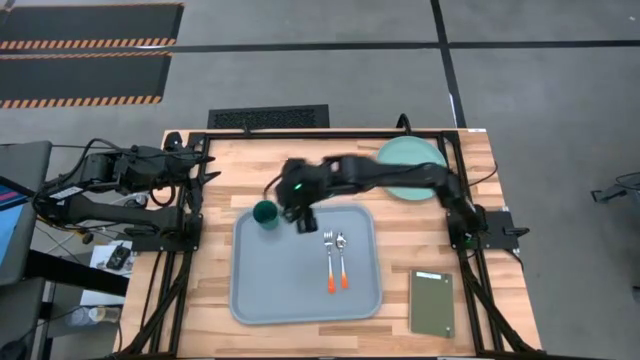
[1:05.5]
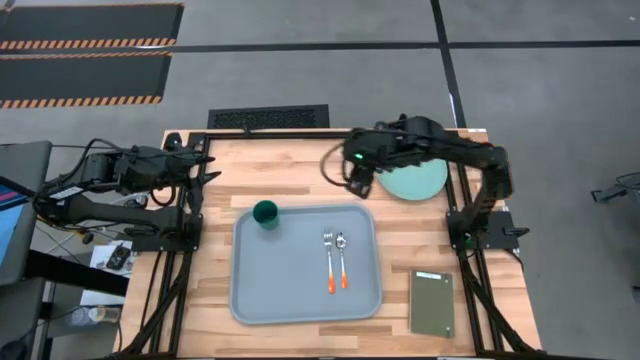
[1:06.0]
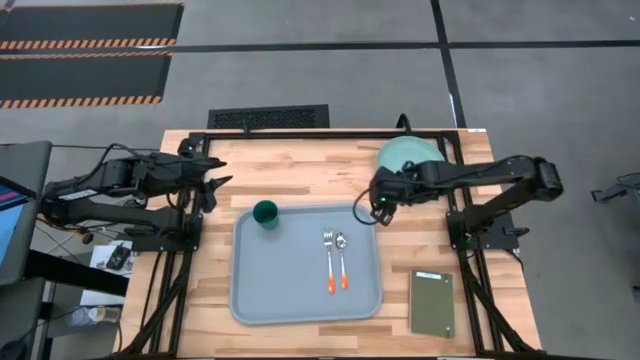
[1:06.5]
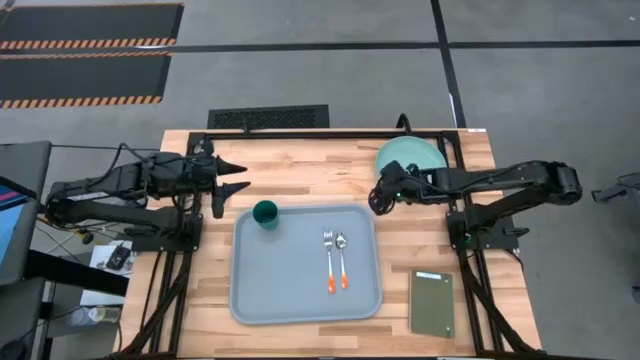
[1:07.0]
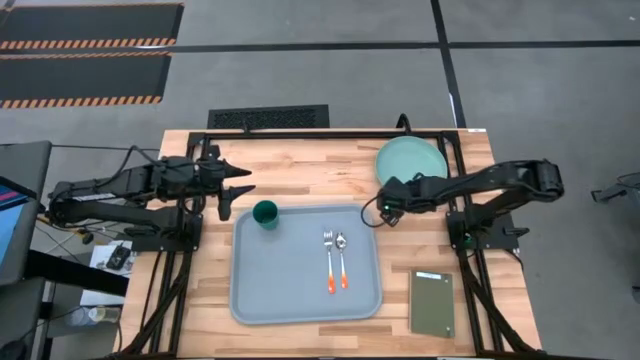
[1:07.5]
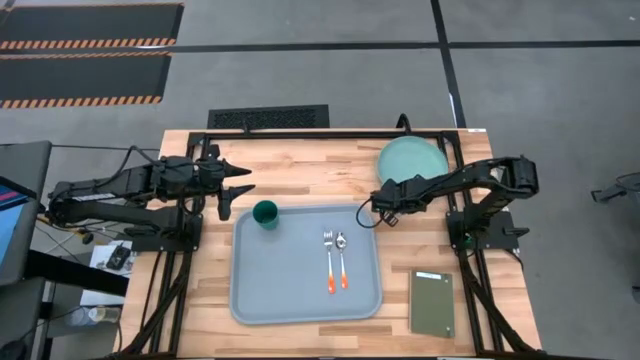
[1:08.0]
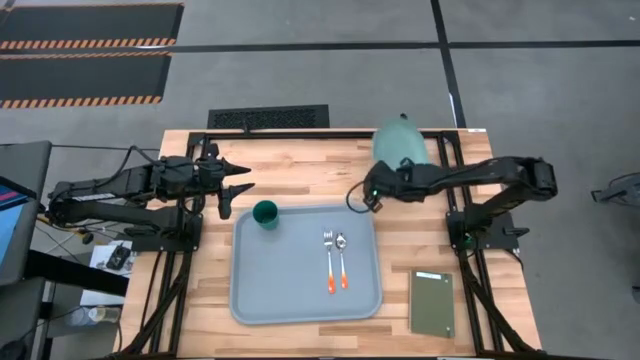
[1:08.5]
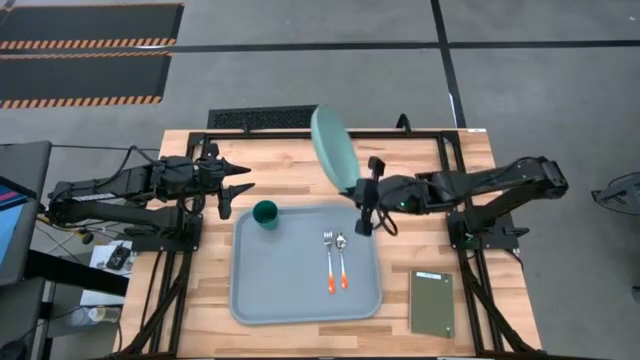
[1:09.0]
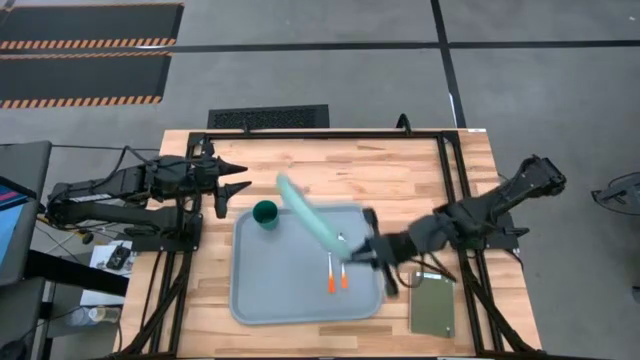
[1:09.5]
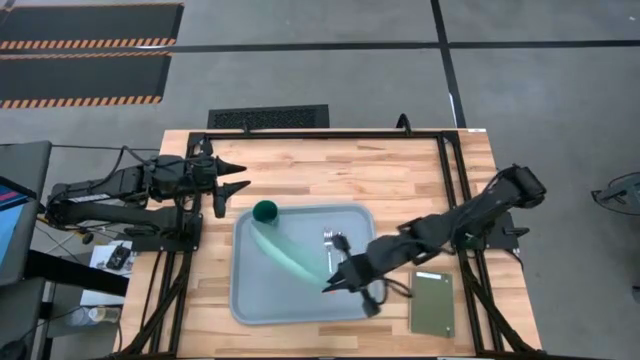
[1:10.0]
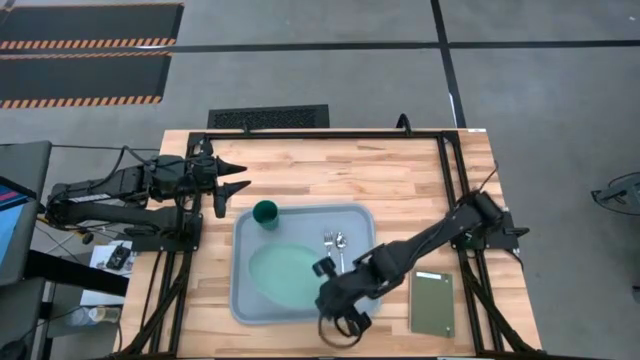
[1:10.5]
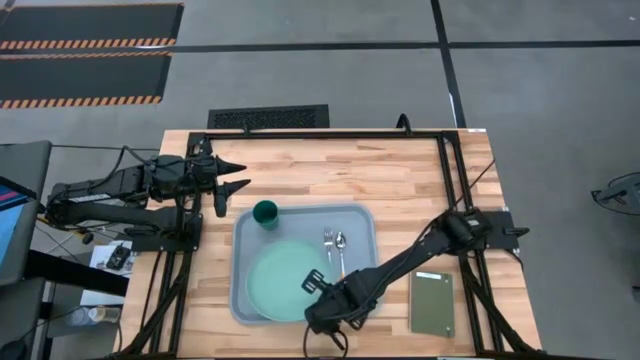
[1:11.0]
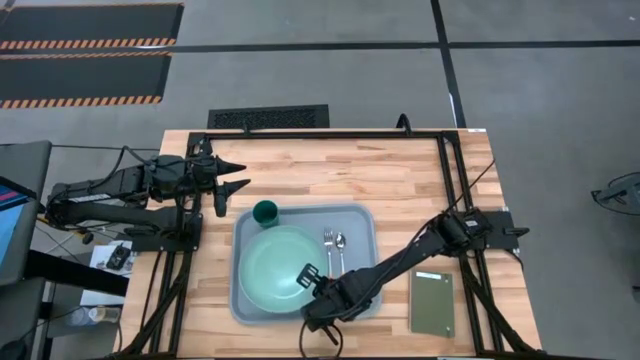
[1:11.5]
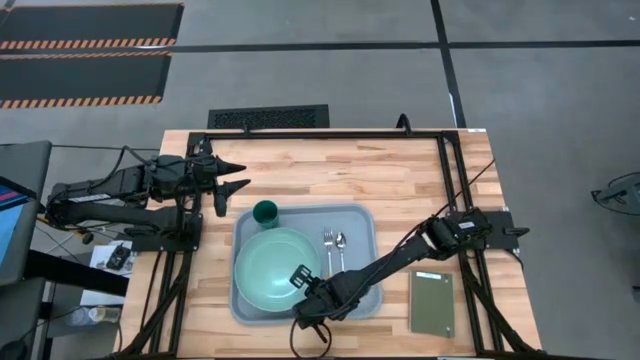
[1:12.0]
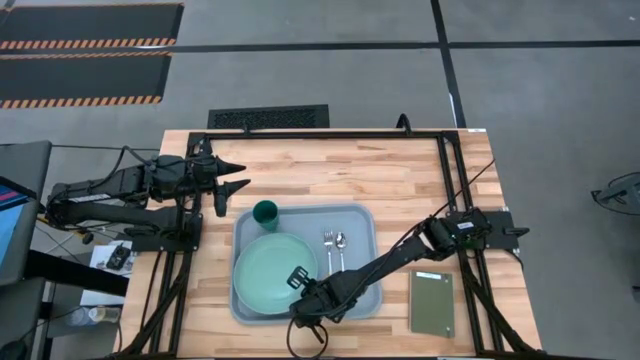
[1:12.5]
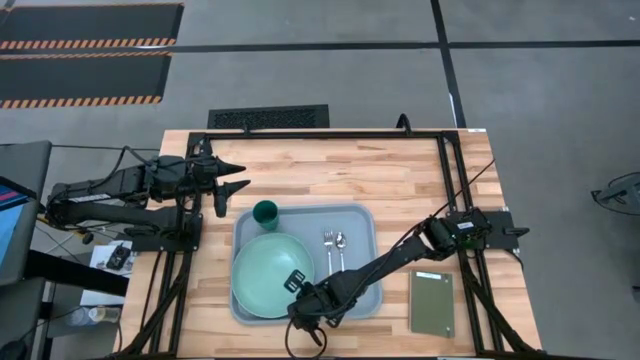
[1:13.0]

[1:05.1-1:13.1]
Task: Pick and place plate/cup/fork/spoon on tray
Put the light blue plate on the gray tray to the bottom of the green cup

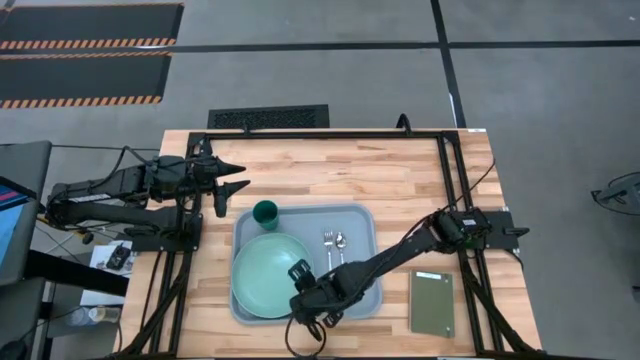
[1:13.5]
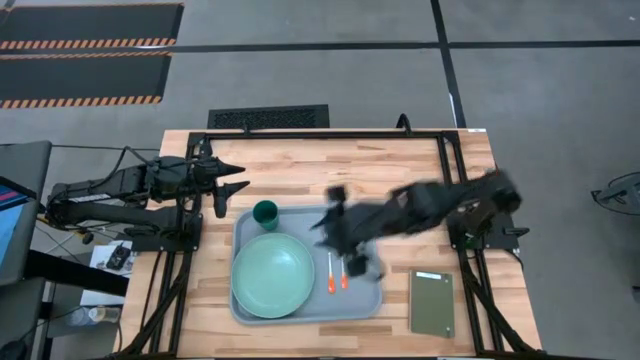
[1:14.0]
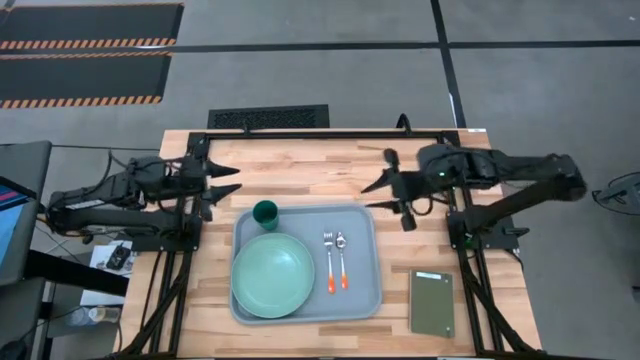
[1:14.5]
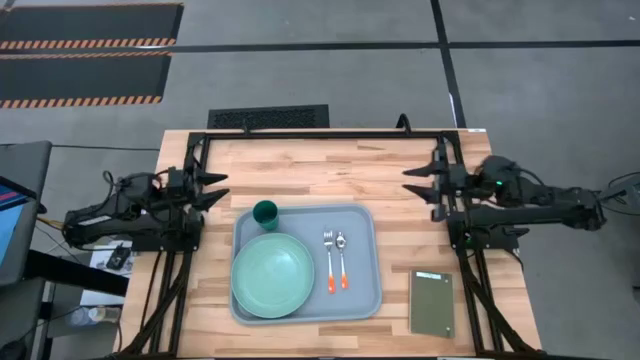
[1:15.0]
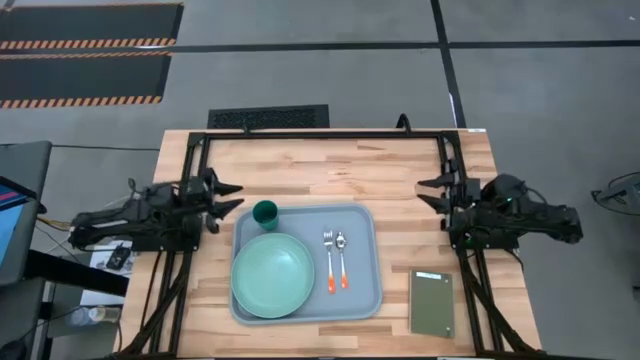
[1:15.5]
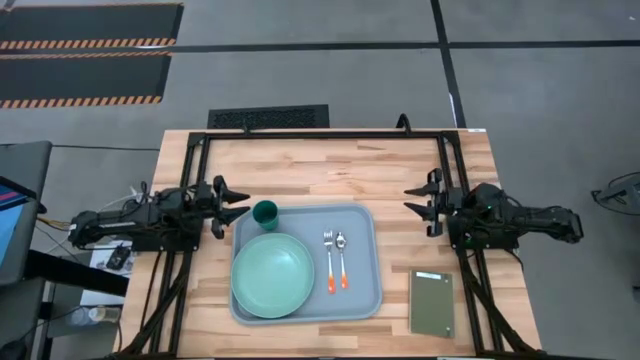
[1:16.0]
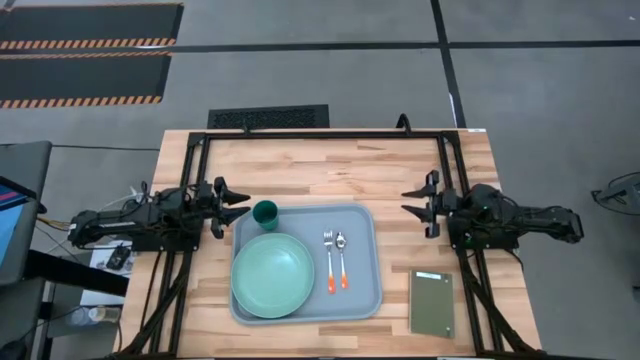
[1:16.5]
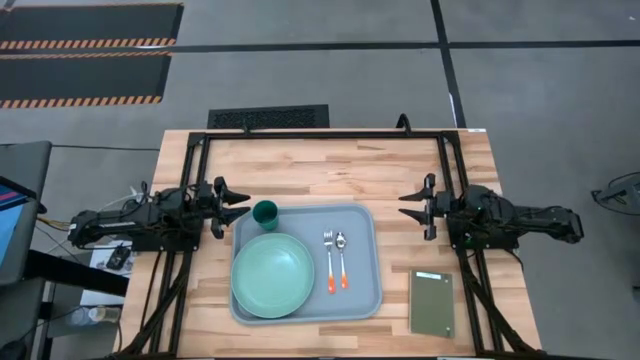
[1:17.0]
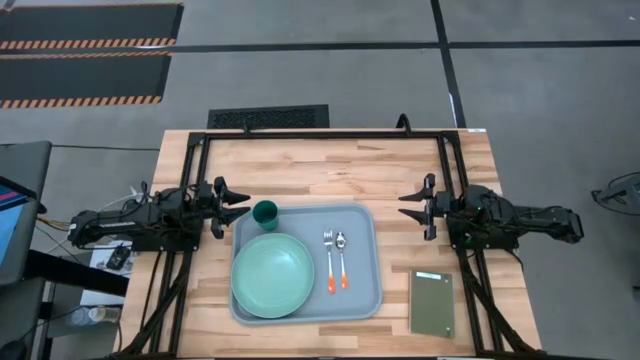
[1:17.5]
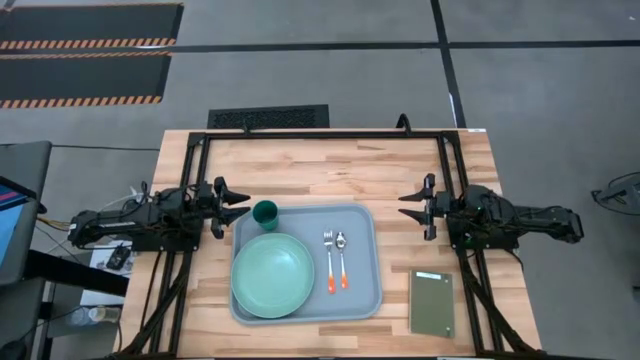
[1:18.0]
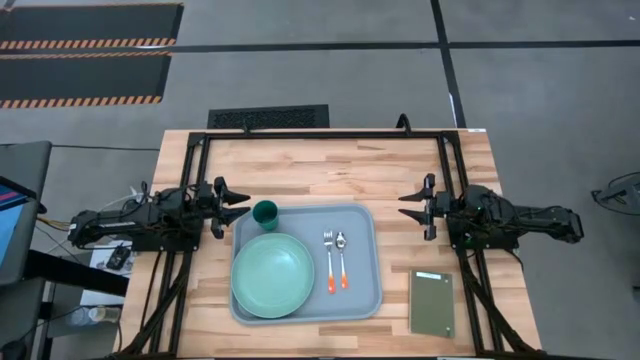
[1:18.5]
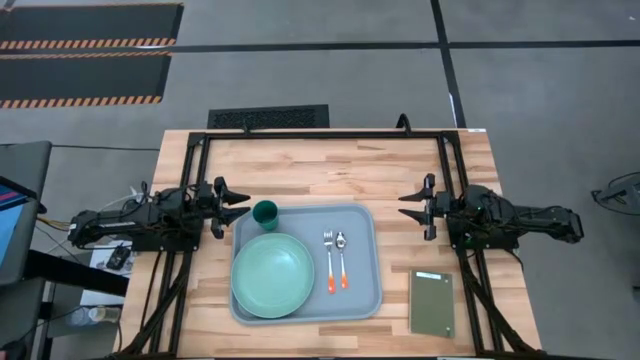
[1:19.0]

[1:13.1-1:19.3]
Return to Home Position

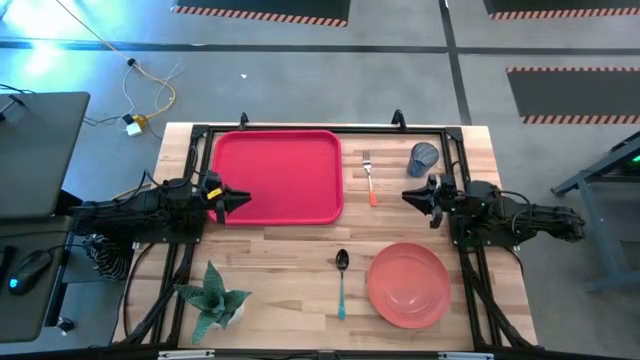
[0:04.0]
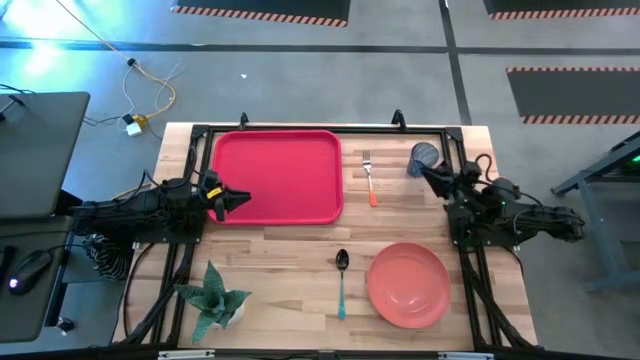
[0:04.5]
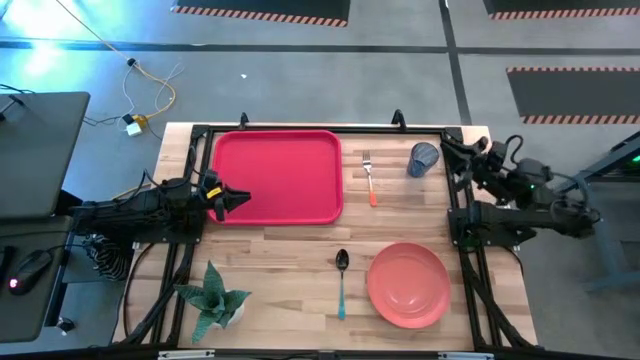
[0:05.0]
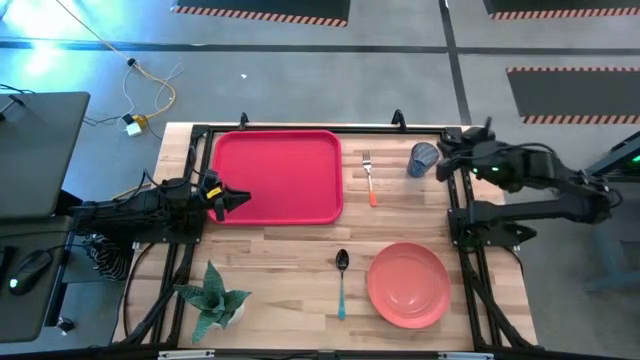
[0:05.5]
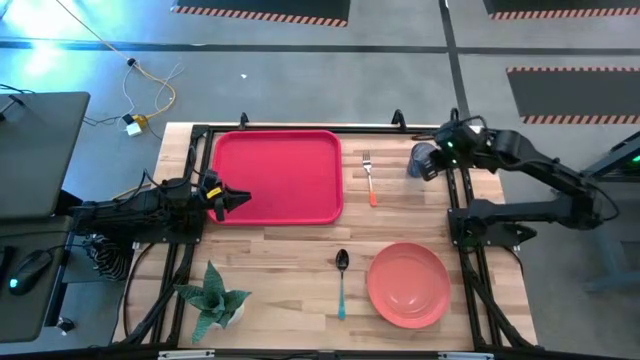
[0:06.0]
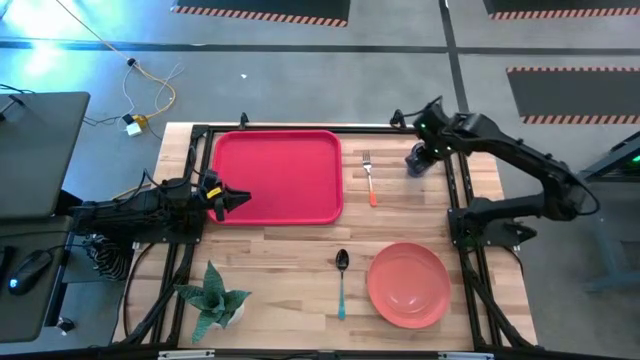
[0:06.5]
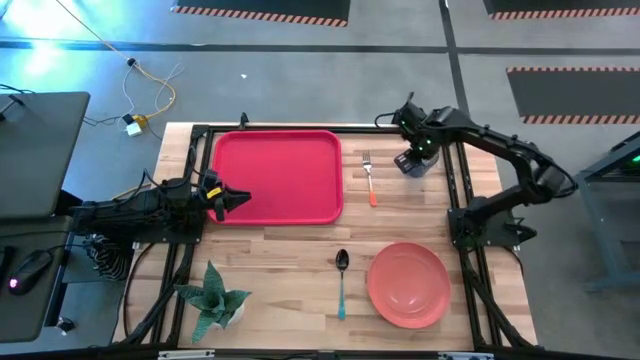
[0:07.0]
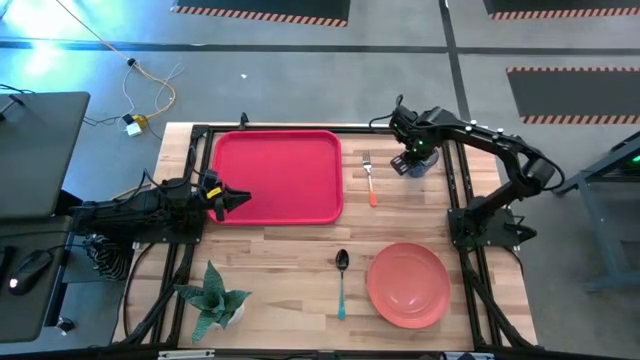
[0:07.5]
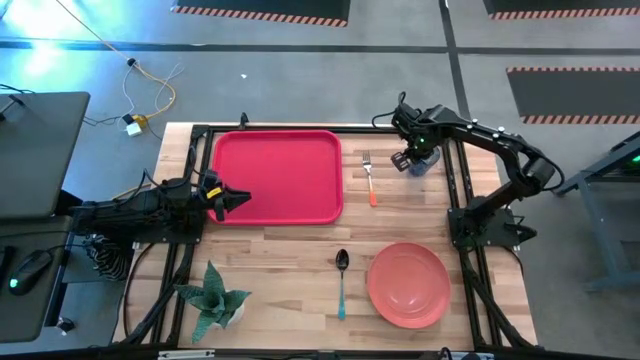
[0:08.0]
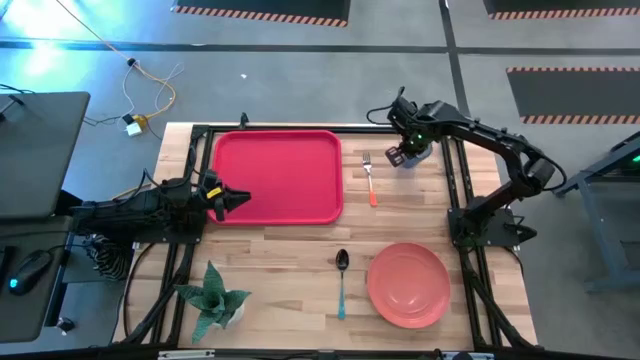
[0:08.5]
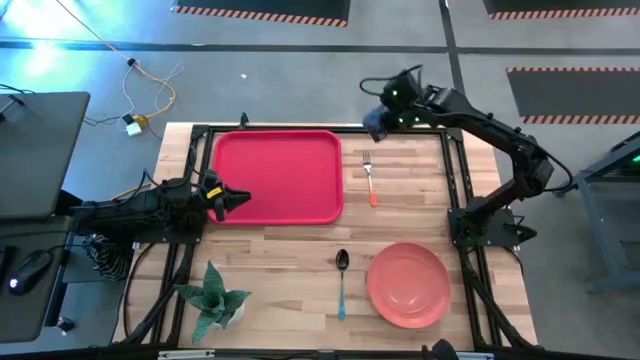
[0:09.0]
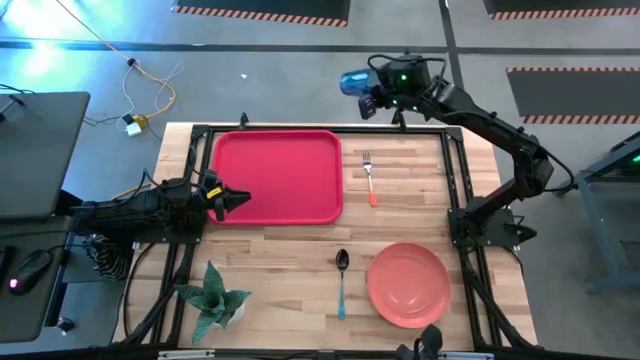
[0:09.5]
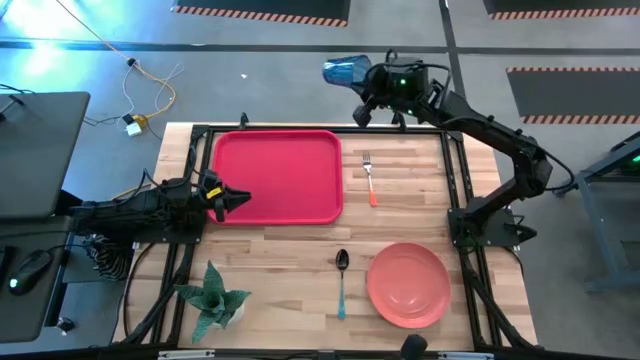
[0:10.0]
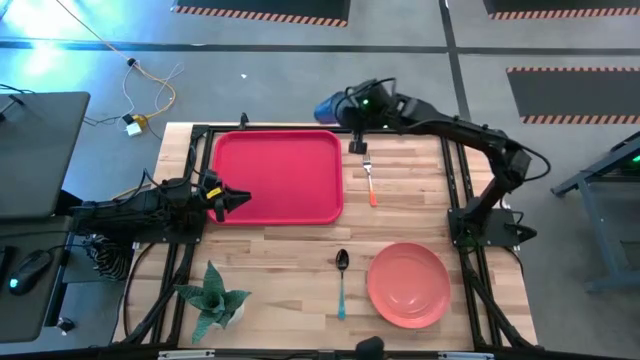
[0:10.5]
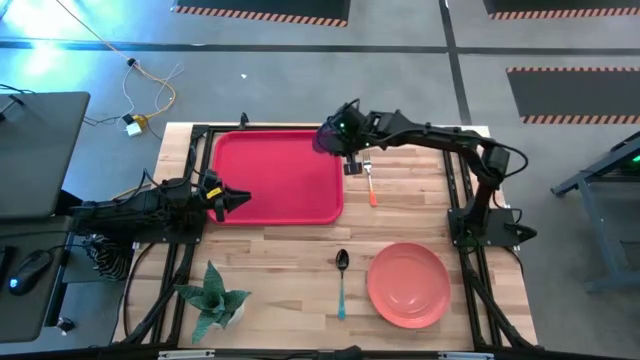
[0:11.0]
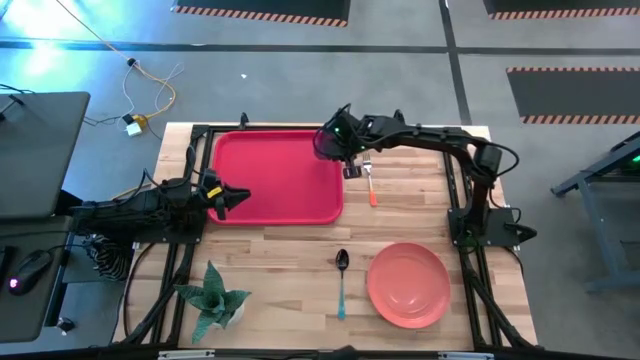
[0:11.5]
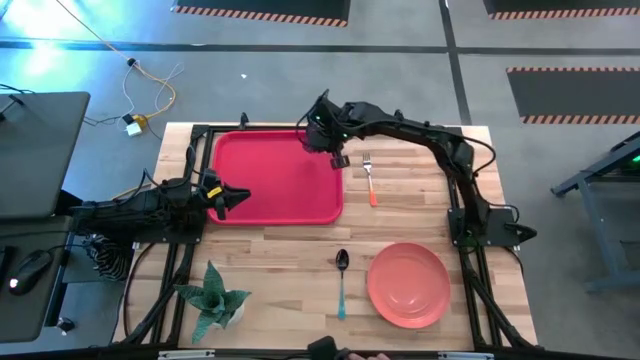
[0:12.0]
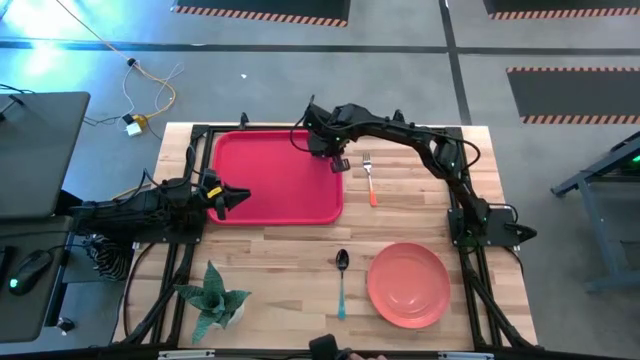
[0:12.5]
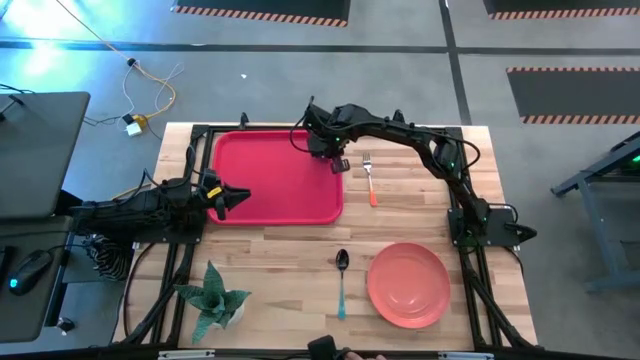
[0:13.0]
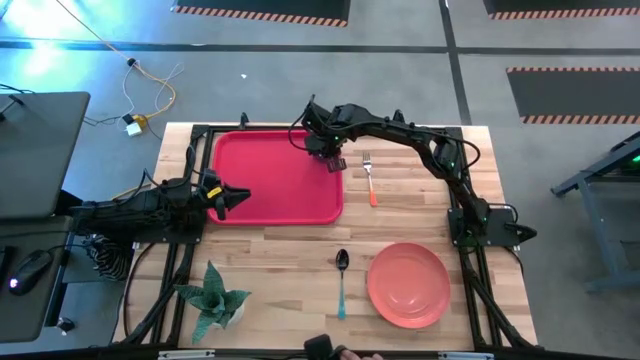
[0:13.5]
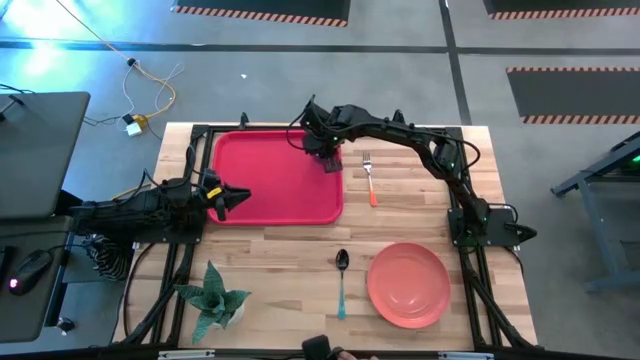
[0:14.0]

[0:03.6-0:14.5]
Task: Pick and place plate/cup/fork/spoon on tray
Put the blue glass on the top right of the red serving tray
